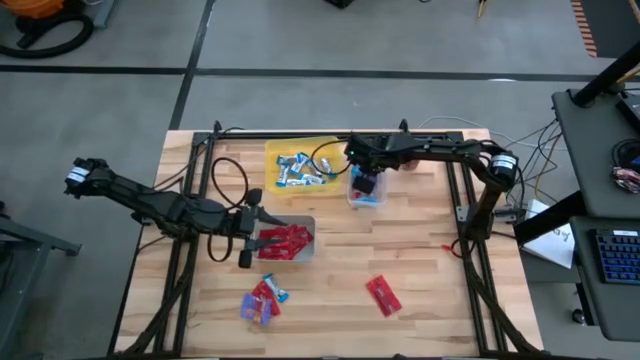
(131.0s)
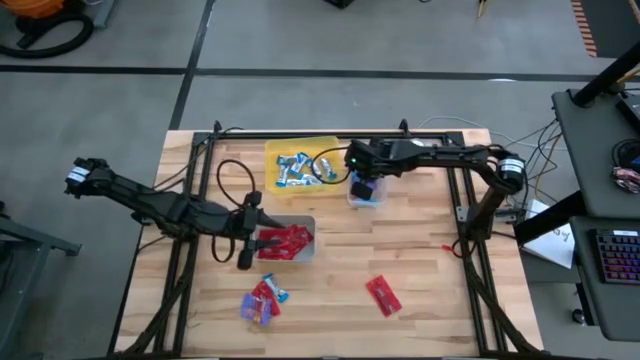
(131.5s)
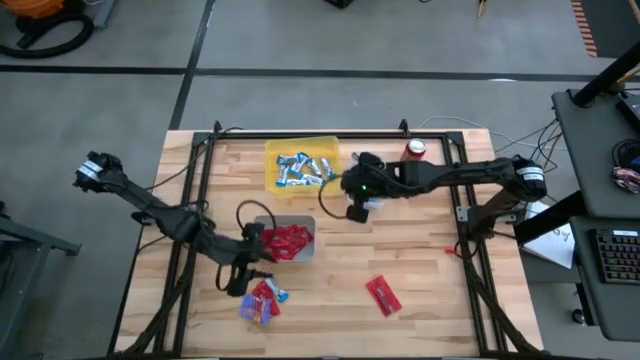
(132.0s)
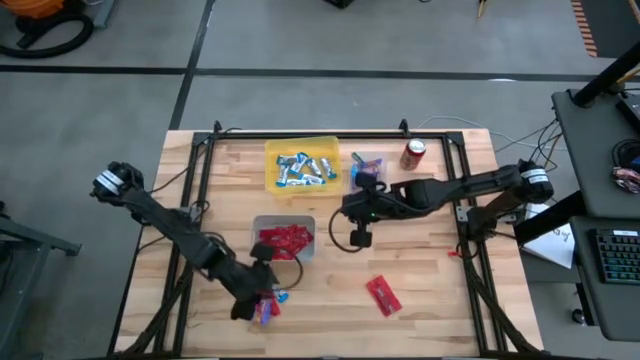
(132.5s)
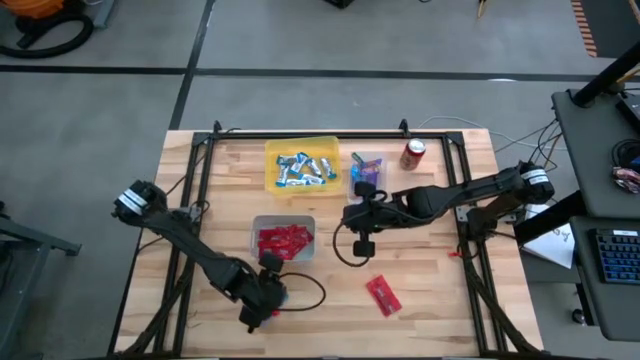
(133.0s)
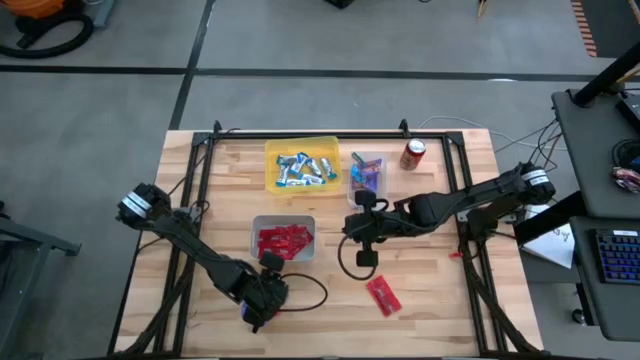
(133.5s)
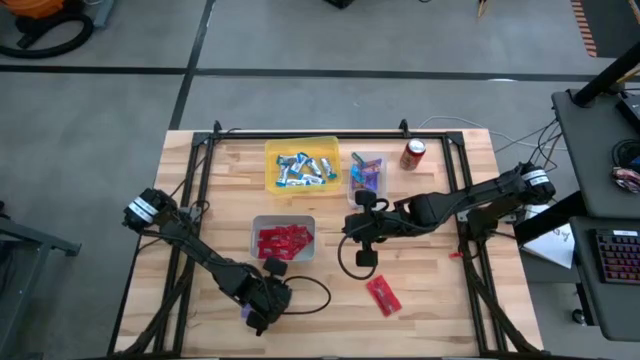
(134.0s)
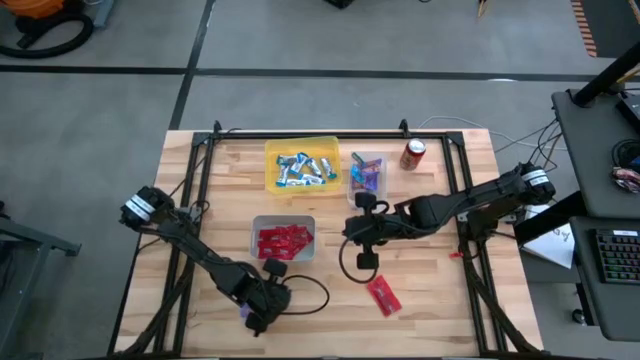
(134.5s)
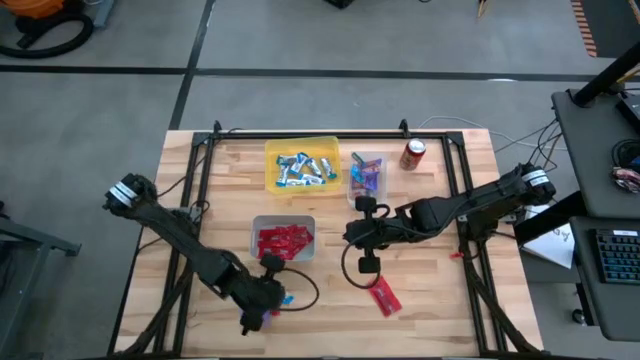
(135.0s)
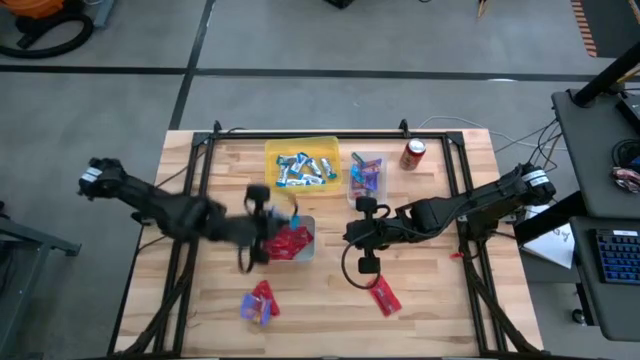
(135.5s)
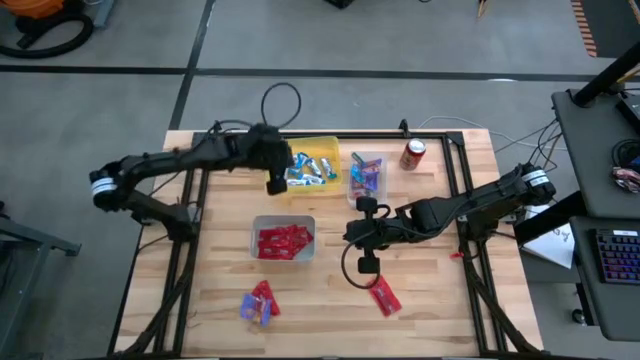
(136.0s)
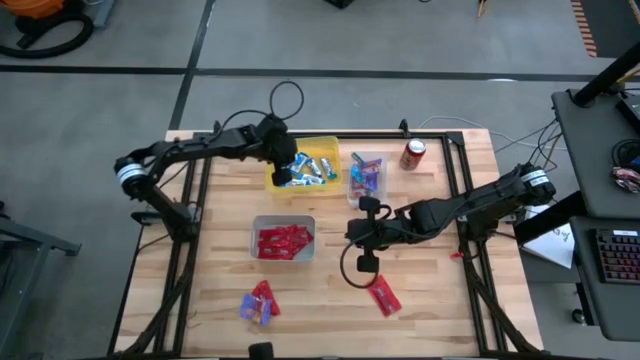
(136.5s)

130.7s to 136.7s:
Task: Sort candy
Put the white candy into the yellow bin

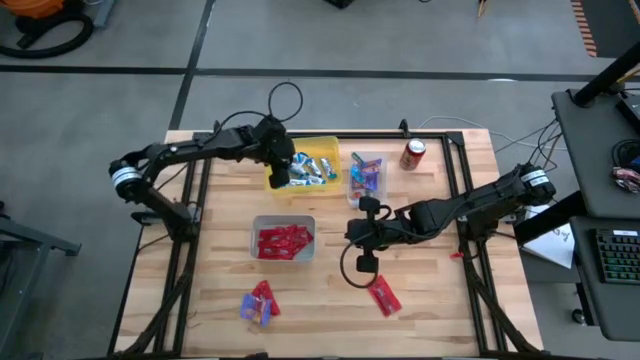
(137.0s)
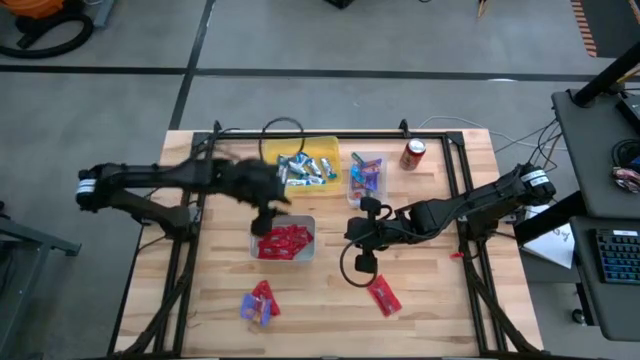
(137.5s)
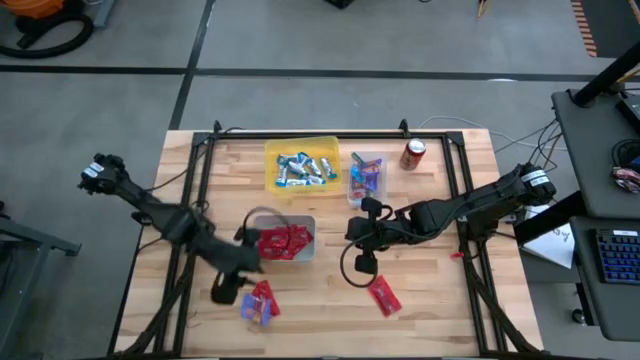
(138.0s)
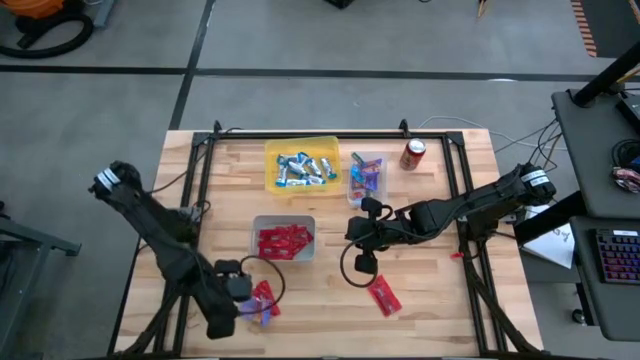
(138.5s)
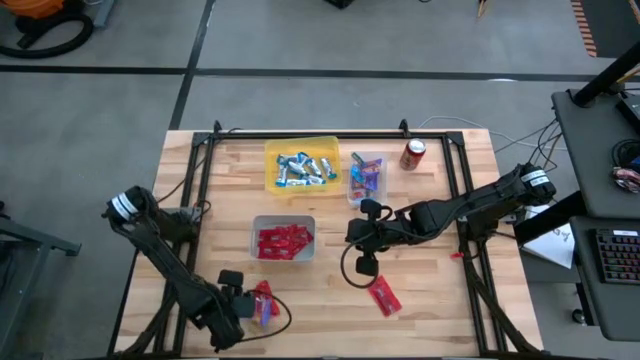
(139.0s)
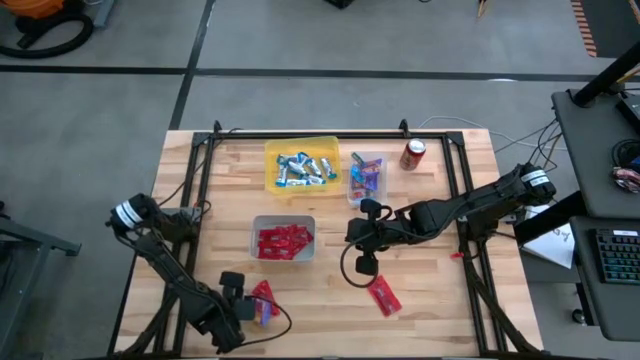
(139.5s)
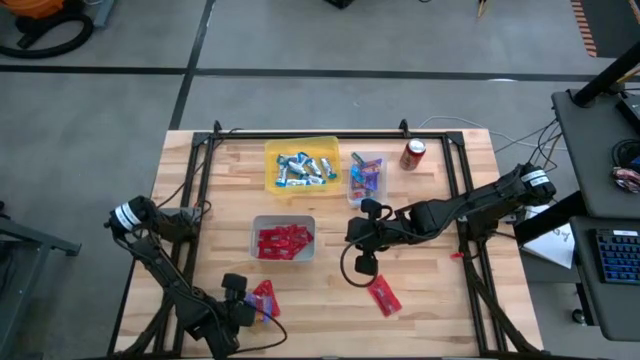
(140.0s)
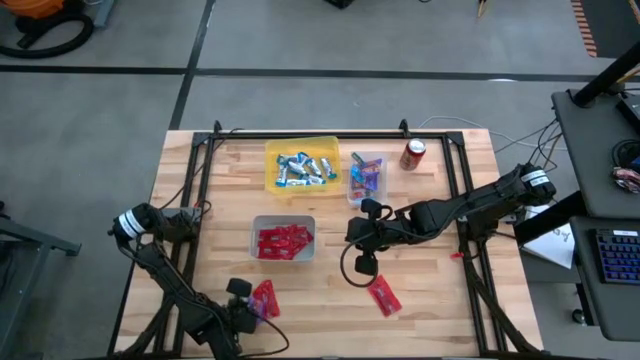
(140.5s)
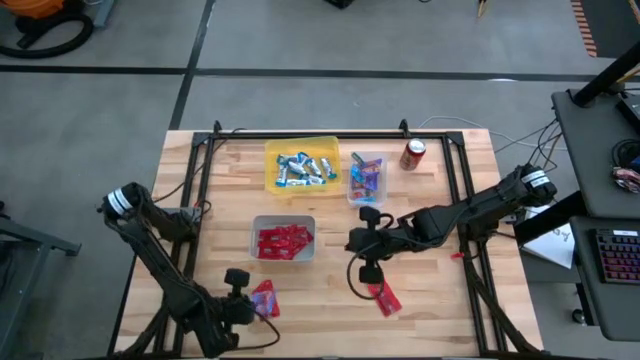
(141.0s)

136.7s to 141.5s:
Put the blue candy into the transparent bin

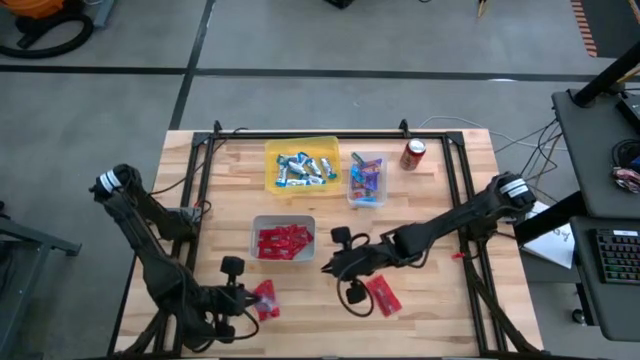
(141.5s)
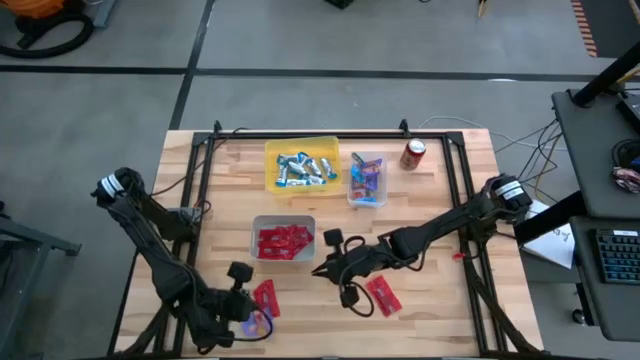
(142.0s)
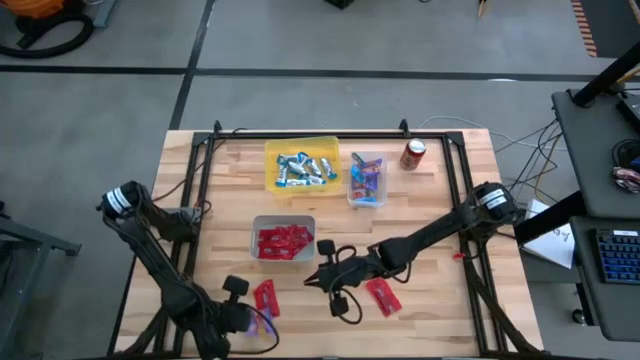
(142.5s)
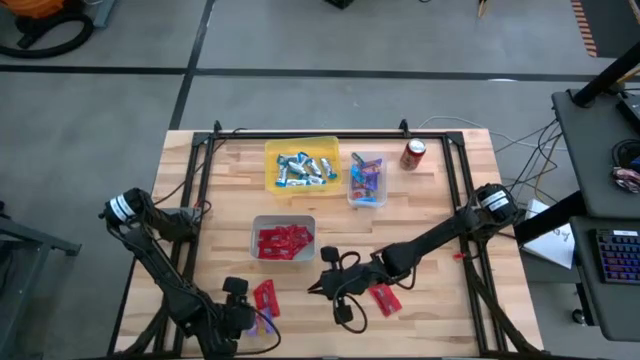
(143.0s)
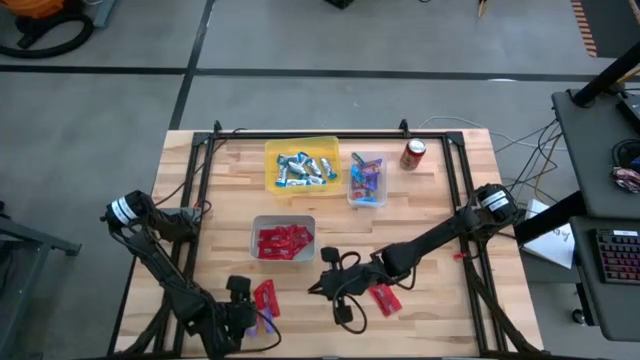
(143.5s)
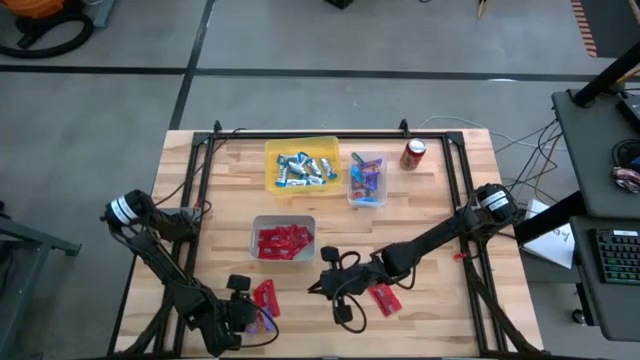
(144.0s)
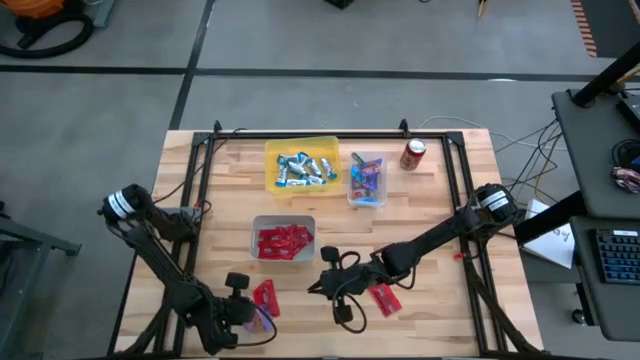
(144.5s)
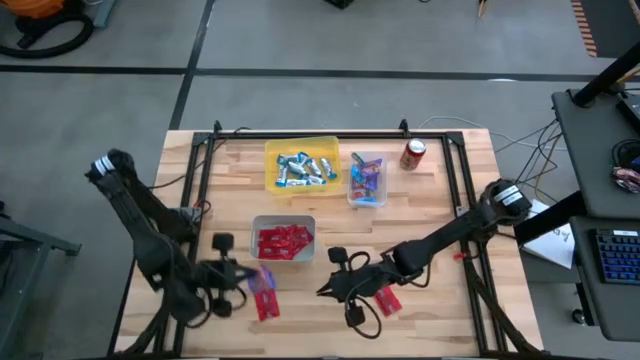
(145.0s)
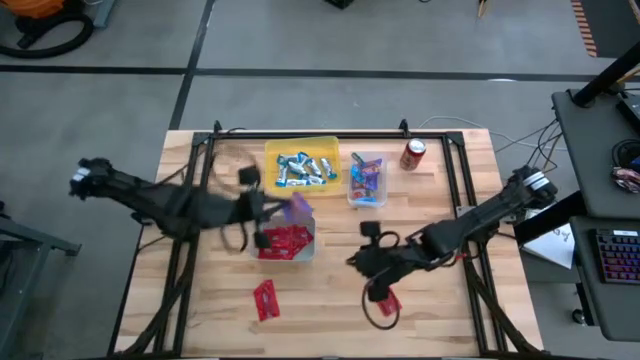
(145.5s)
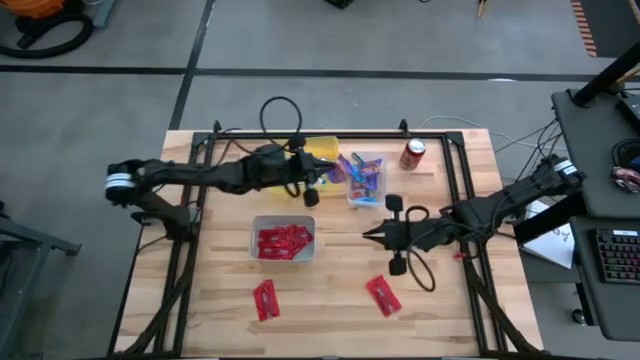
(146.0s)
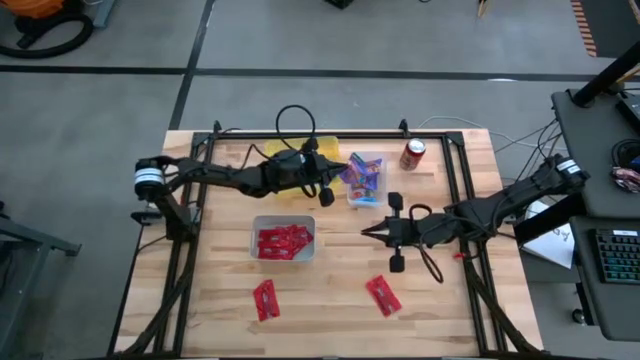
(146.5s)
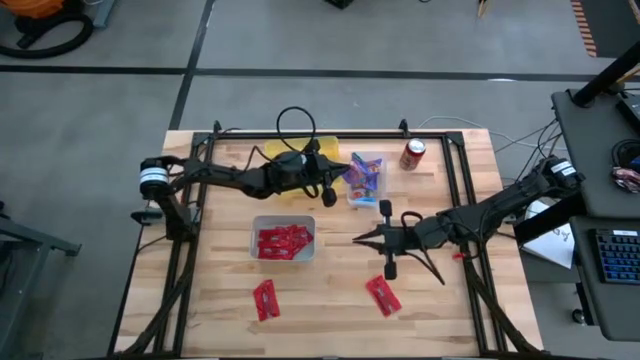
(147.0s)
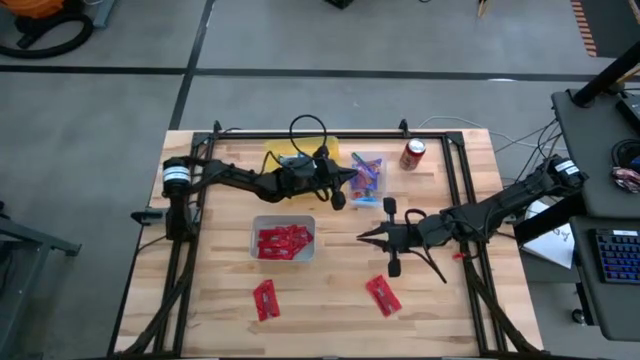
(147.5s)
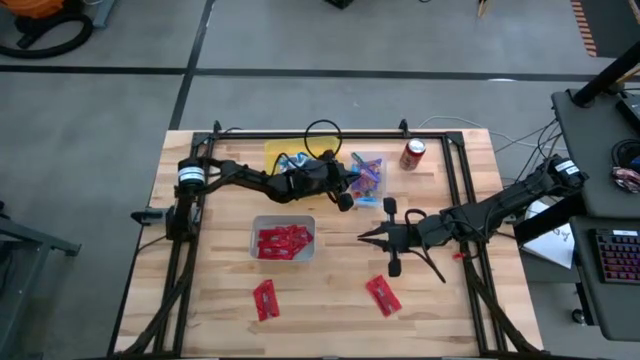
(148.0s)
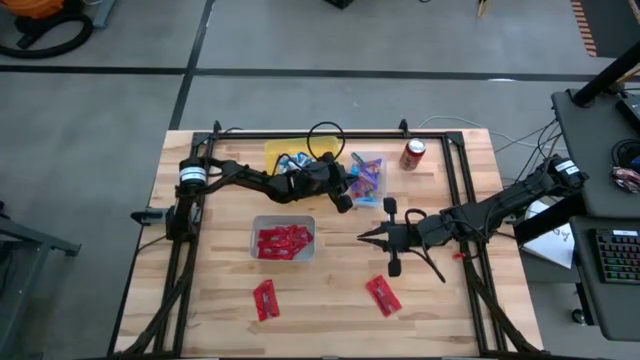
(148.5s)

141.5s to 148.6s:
Put the blue candy into the transparent bin

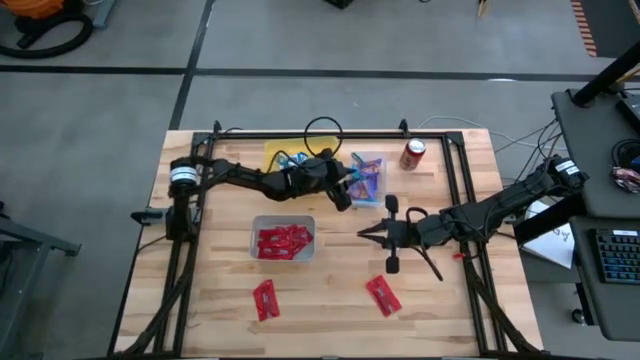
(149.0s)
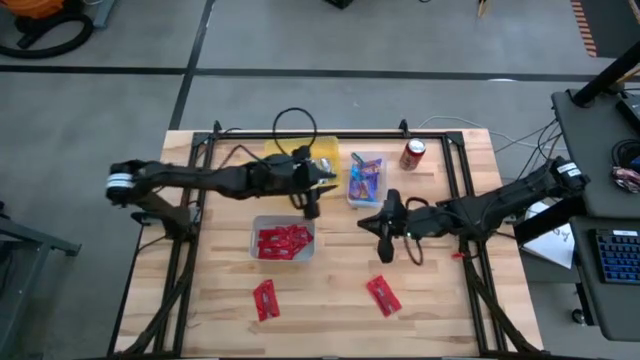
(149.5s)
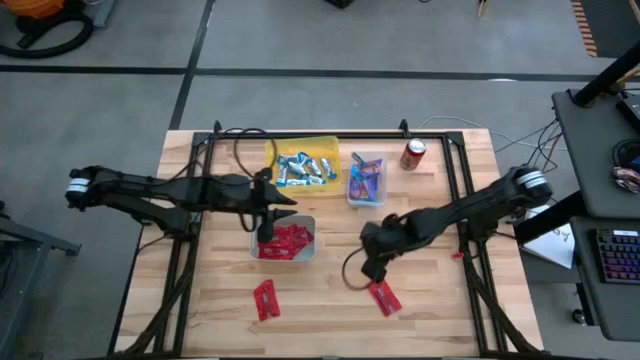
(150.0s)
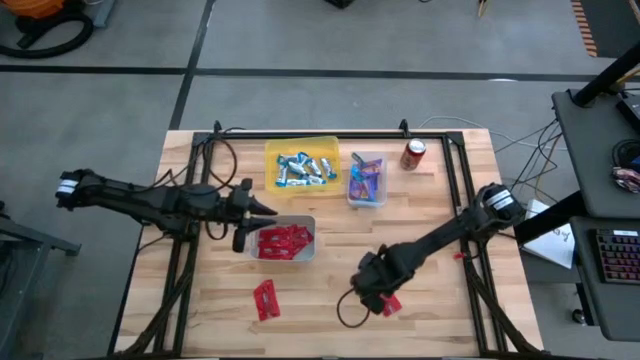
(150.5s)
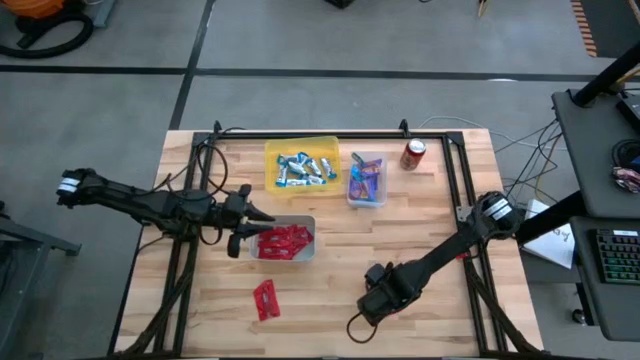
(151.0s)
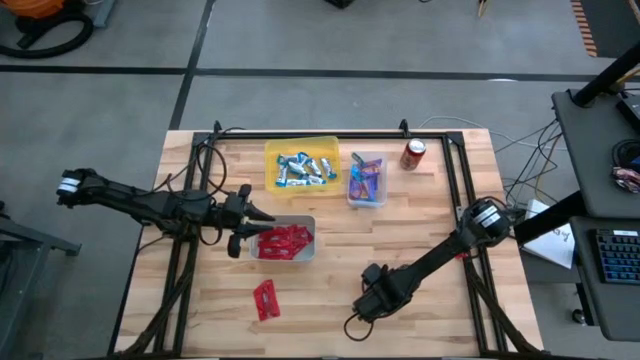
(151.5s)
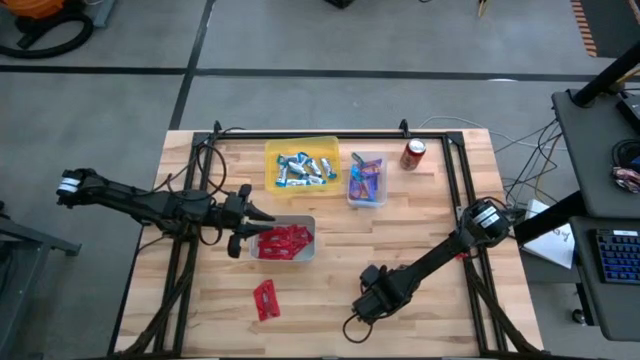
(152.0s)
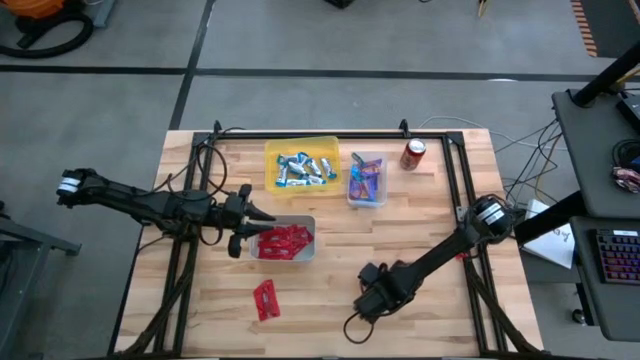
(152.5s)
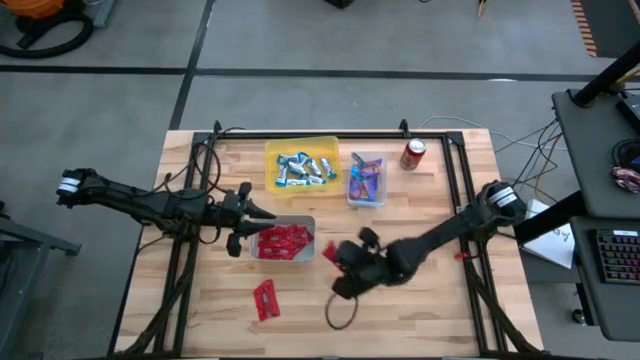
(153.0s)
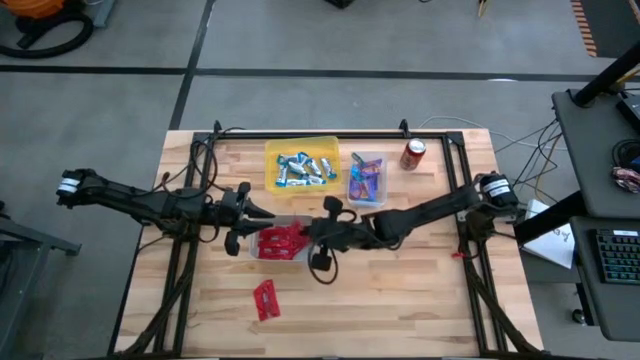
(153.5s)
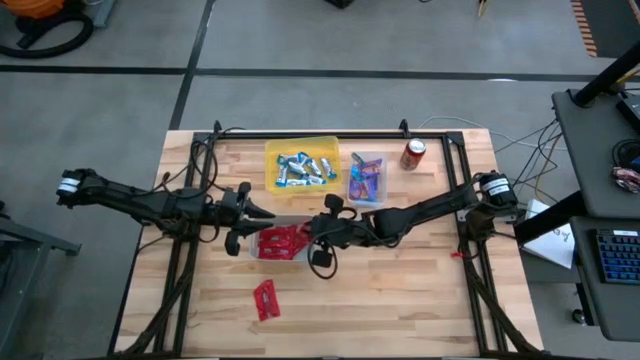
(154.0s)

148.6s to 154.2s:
Put the right red candy into the gray bin
